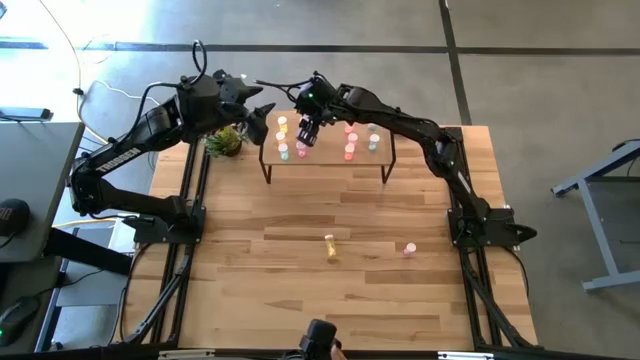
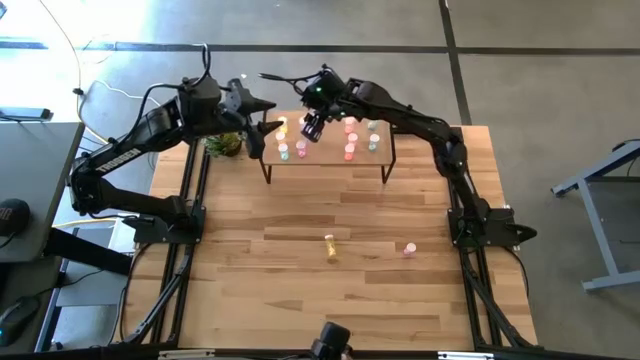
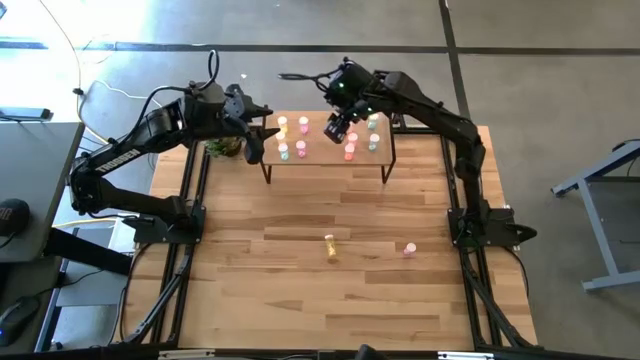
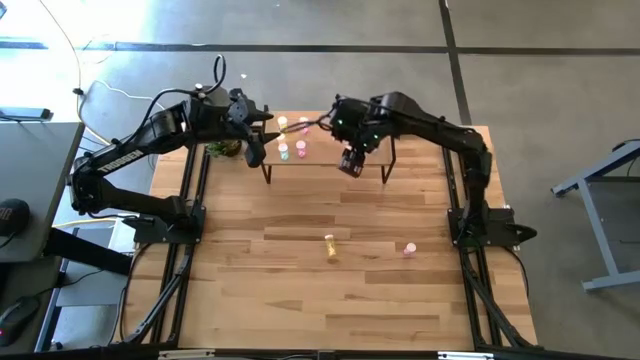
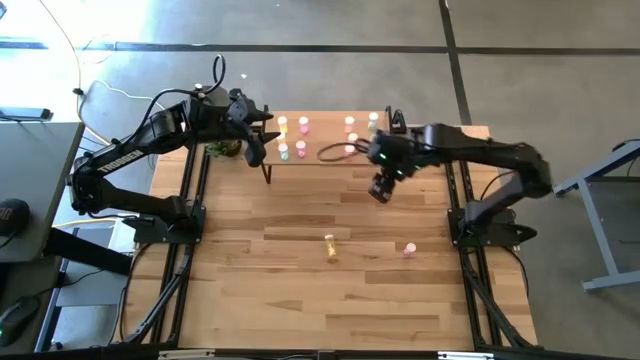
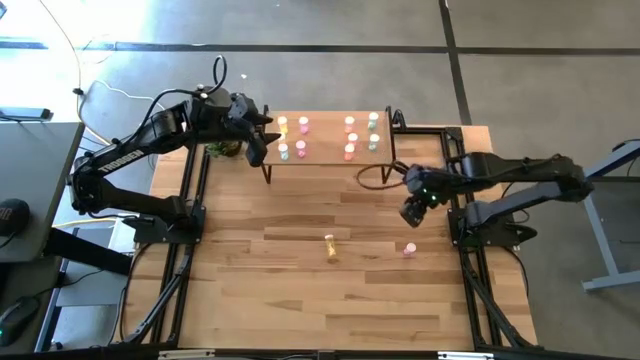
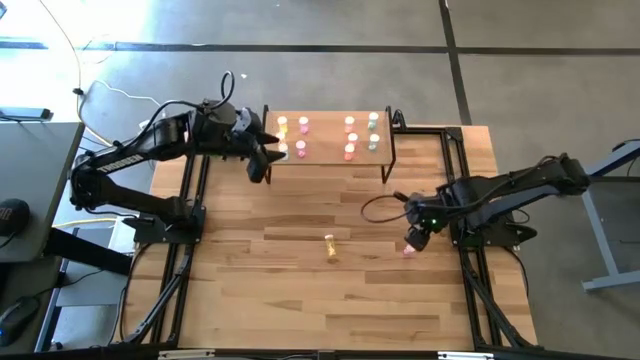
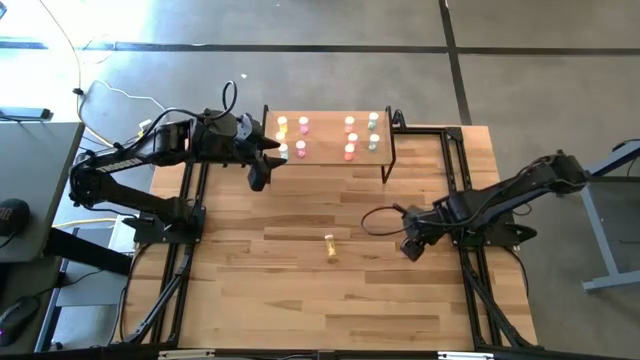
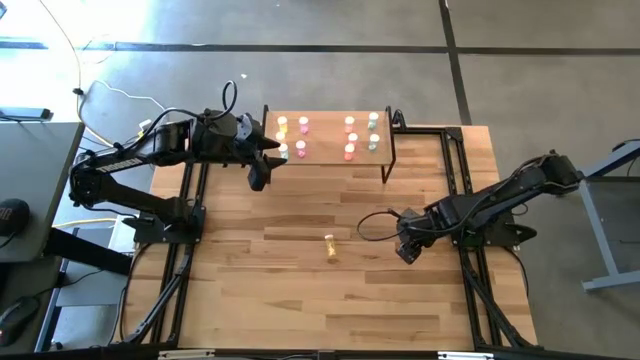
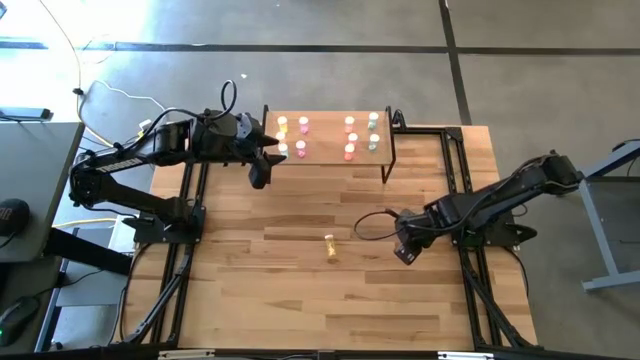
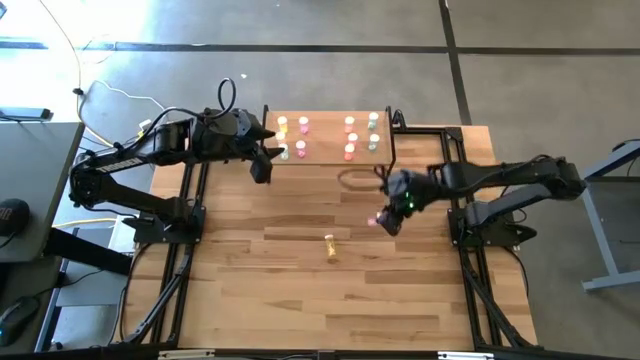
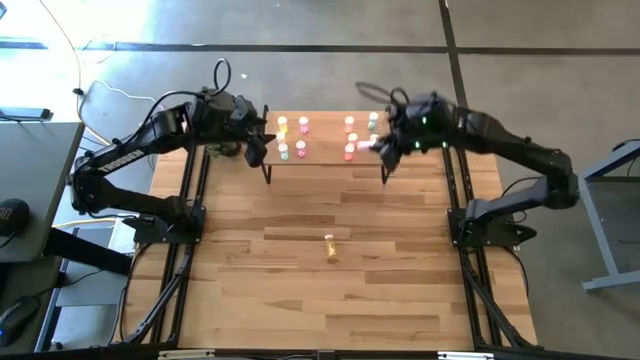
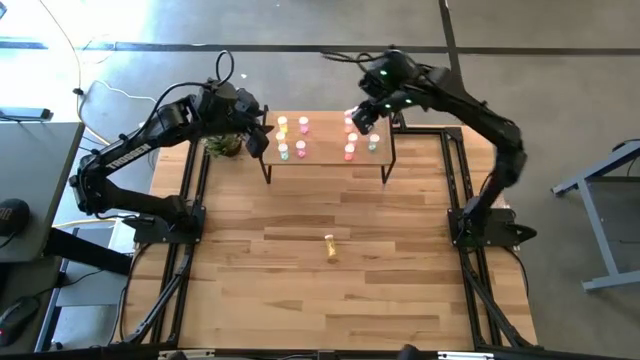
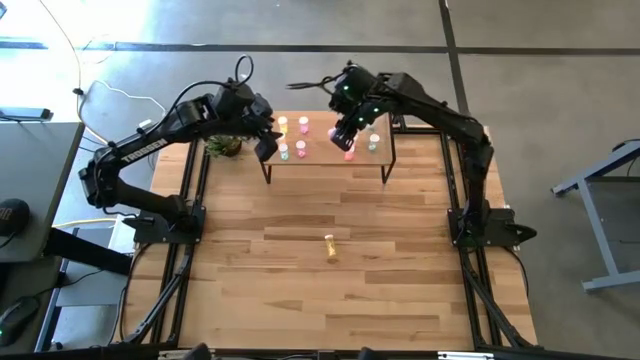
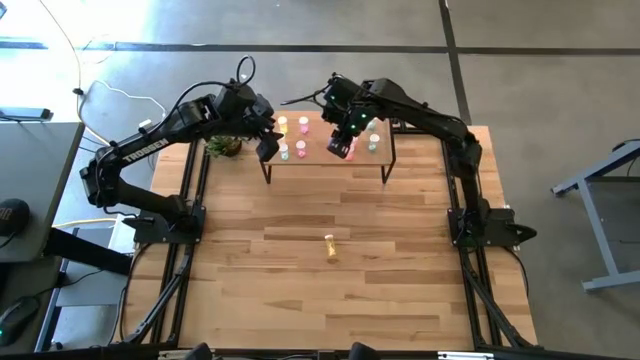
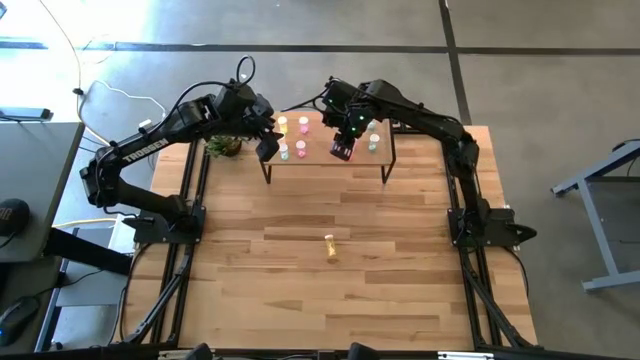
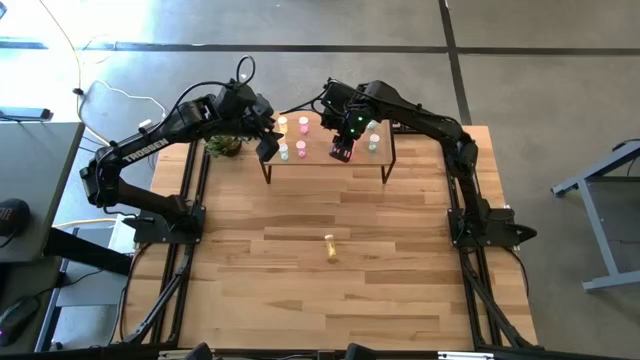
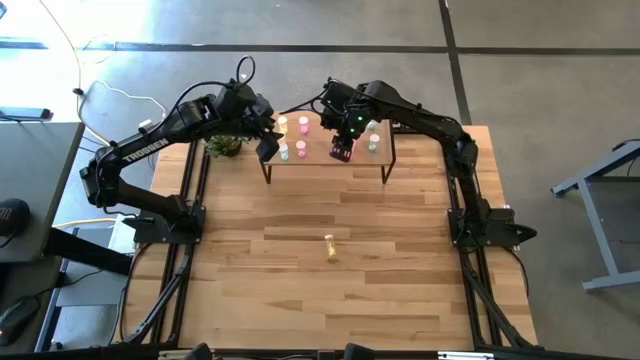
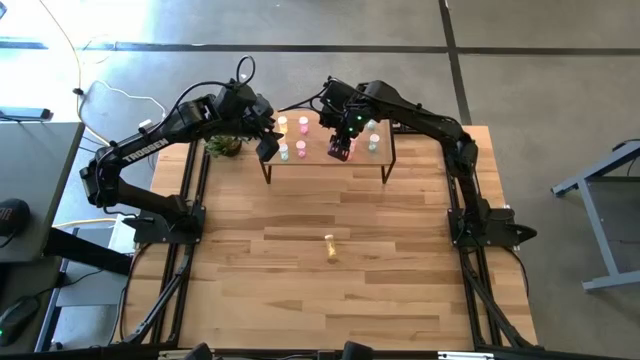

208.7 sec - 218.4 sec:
Task: Pick and place medicine bottles onto shelf by color
Put the pink pill bottle on the shelf

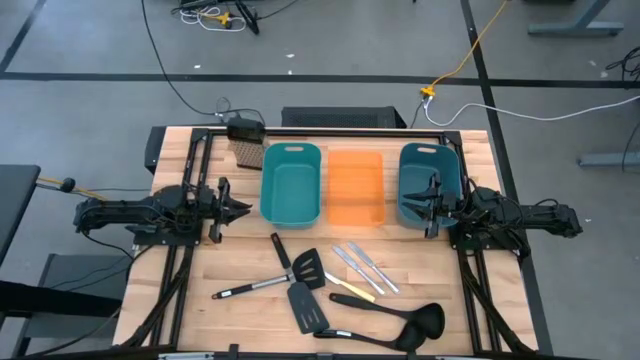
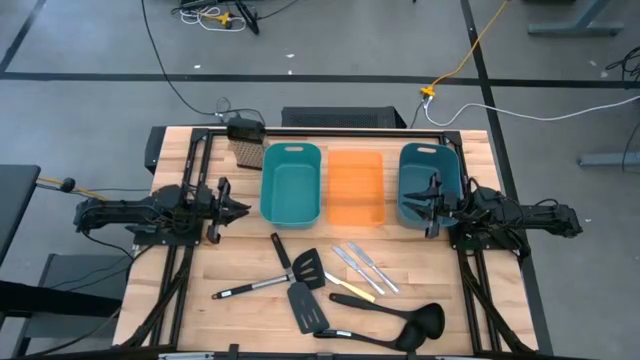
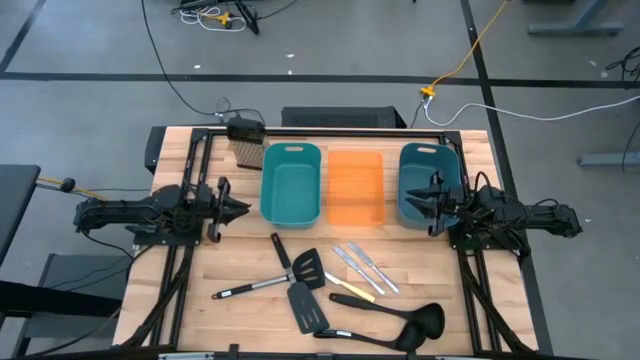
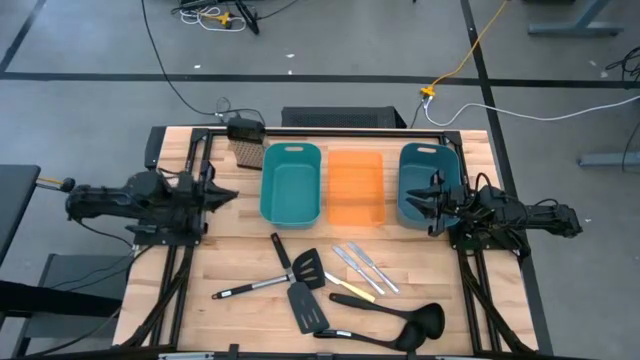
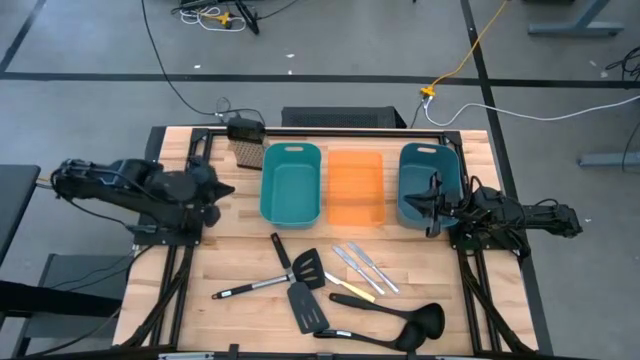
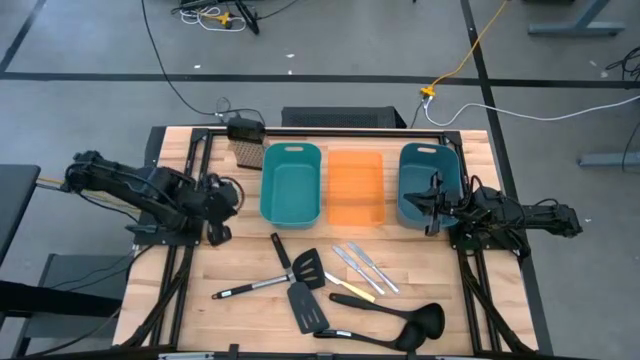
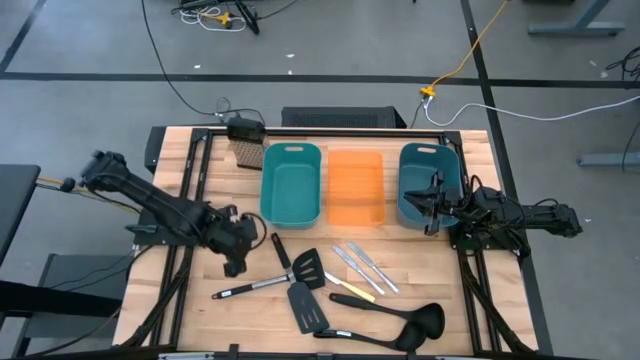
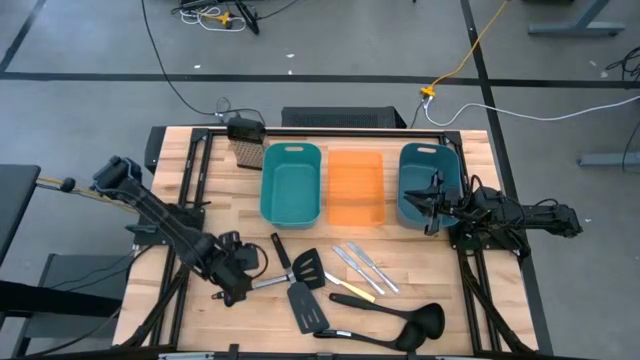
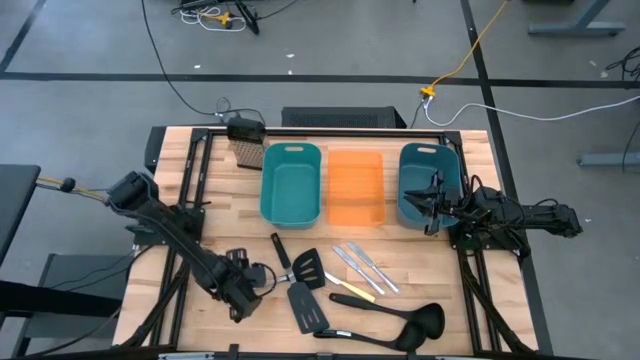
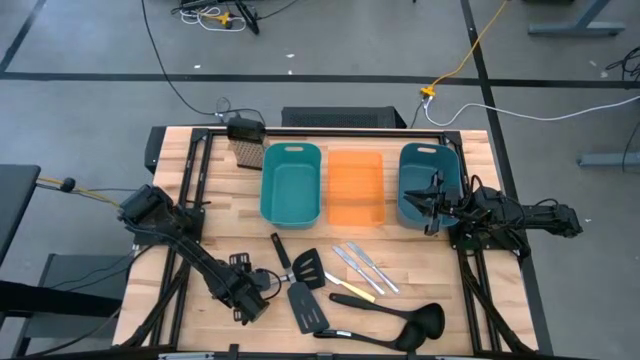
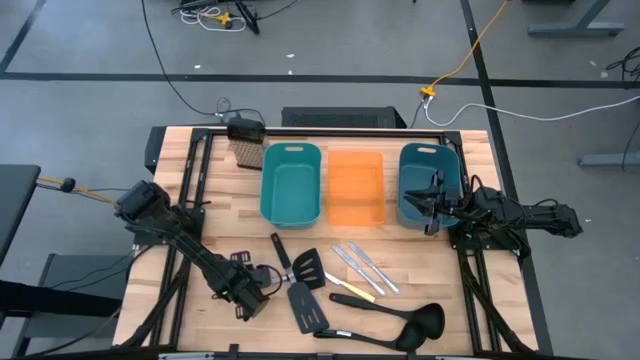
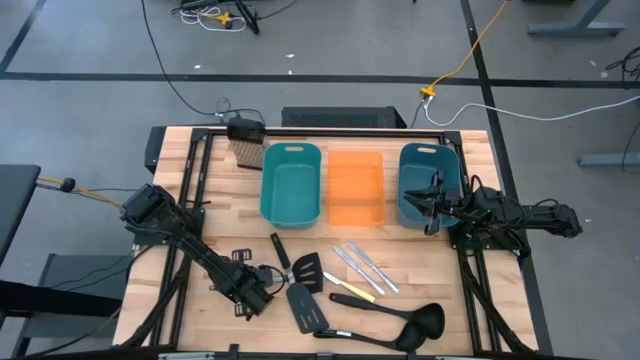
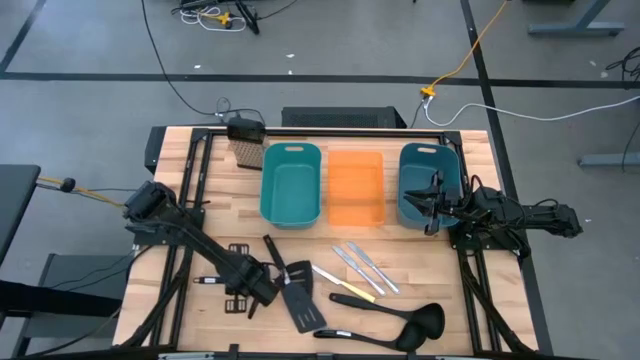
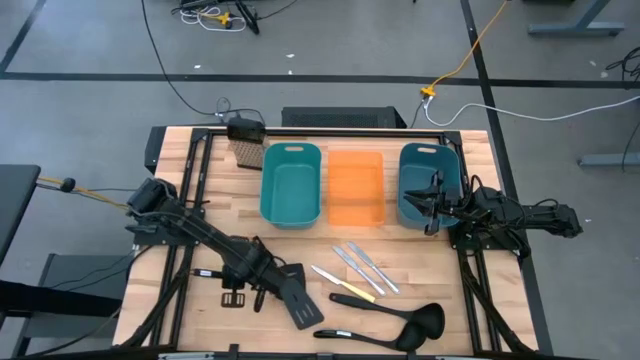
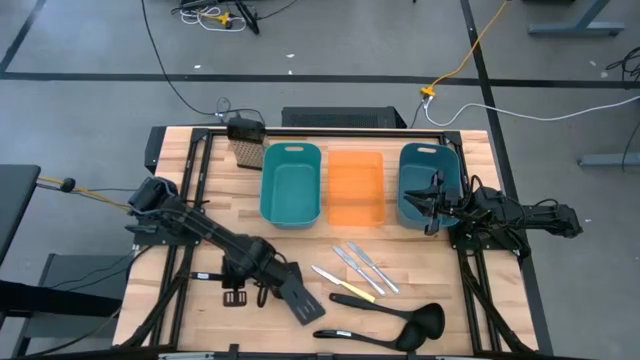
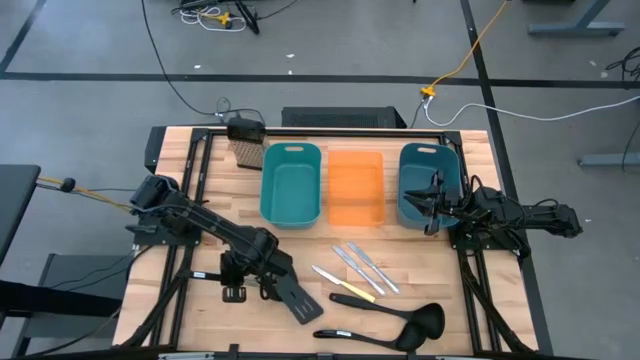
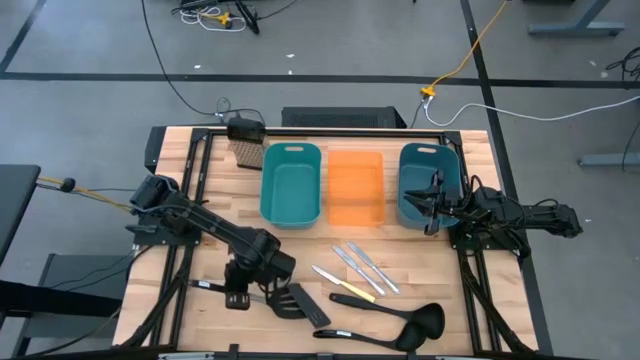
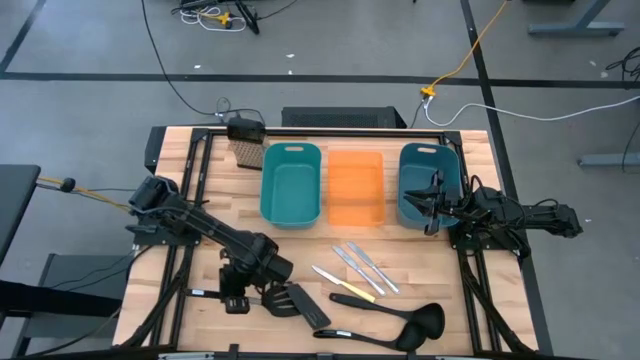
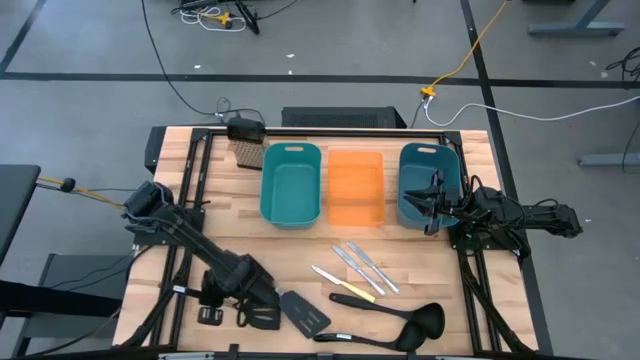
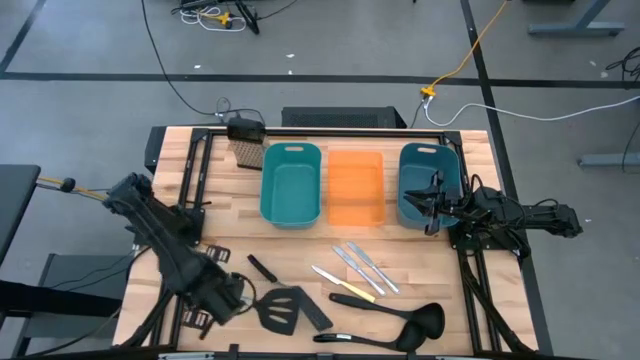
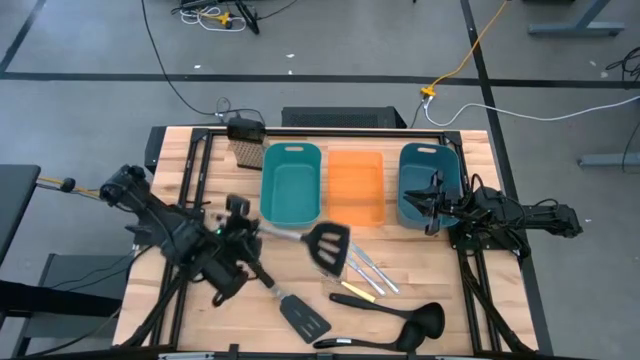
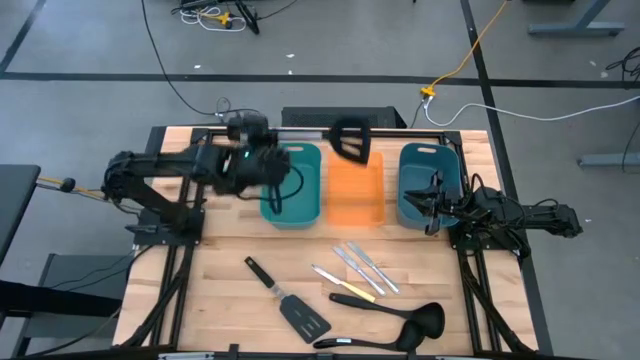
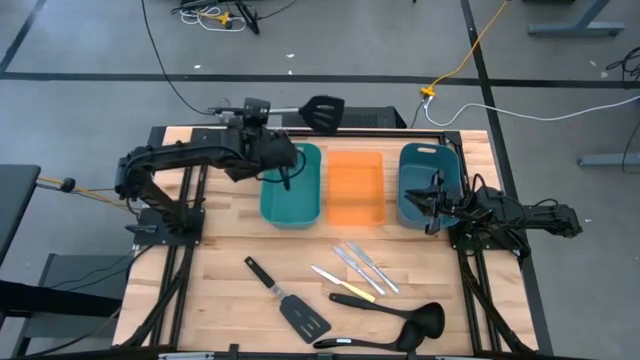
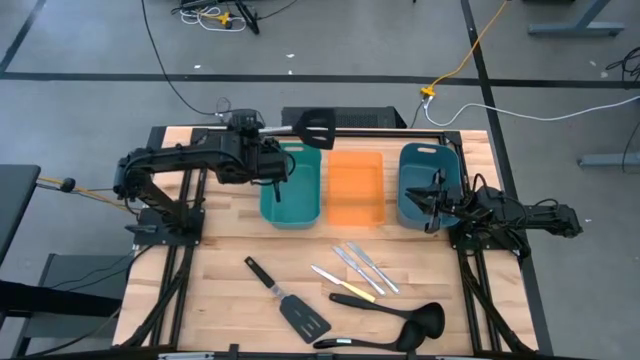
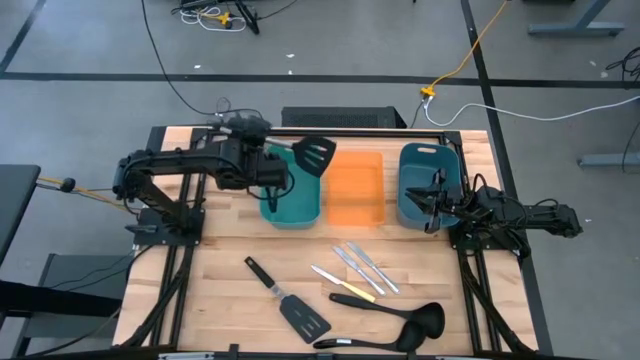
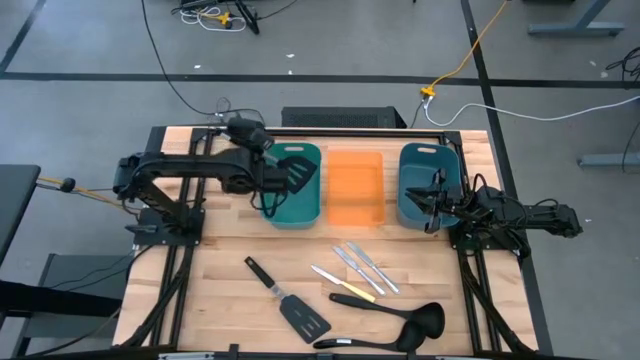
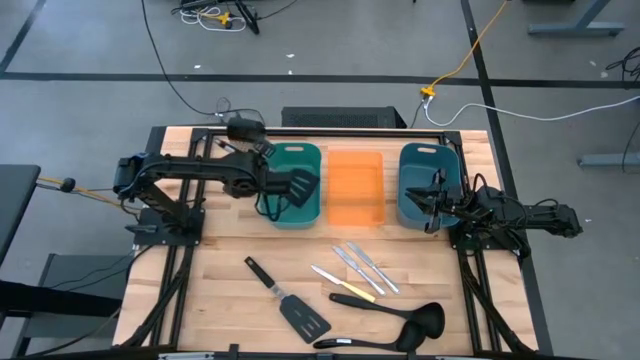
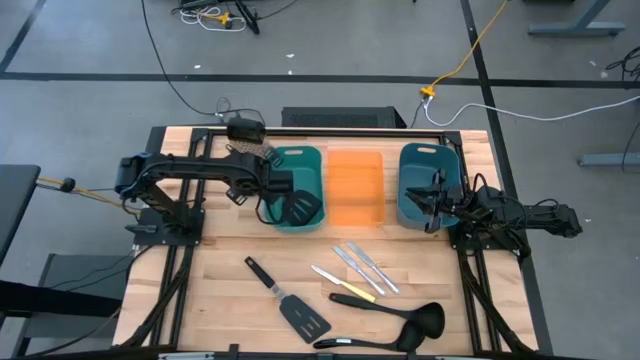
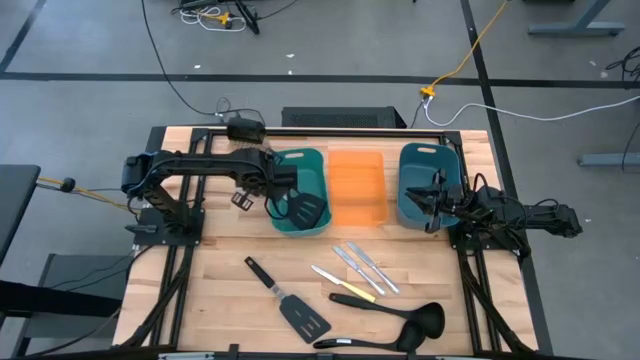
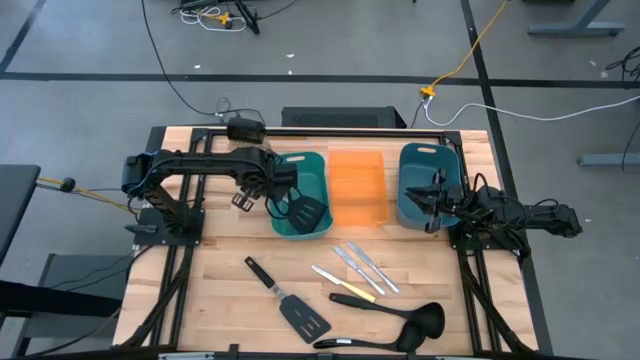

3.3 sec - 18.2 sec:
Task: Pick & Place Kitchen Items
Put the top black spatula into the green bin
